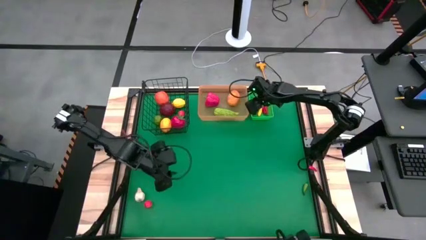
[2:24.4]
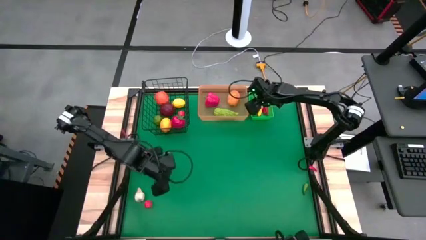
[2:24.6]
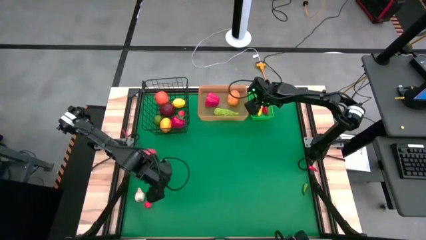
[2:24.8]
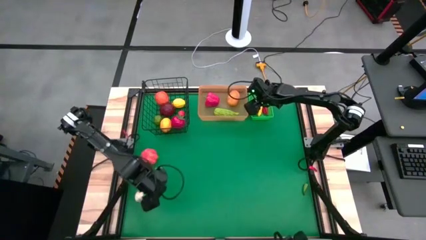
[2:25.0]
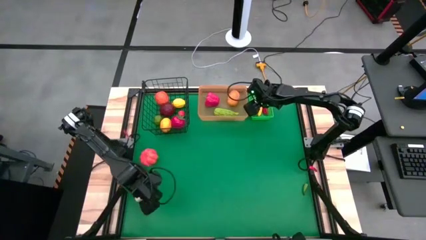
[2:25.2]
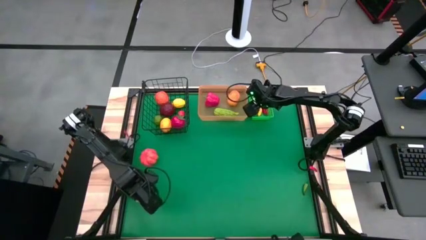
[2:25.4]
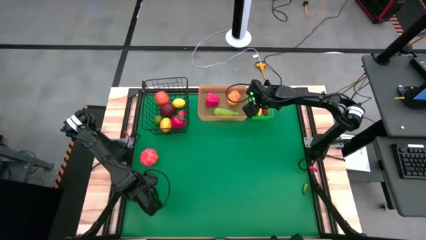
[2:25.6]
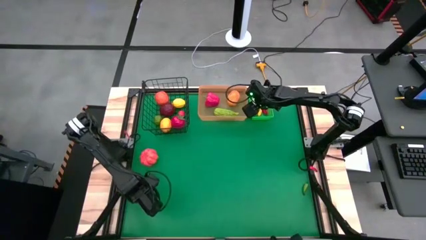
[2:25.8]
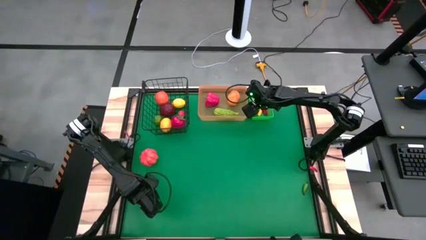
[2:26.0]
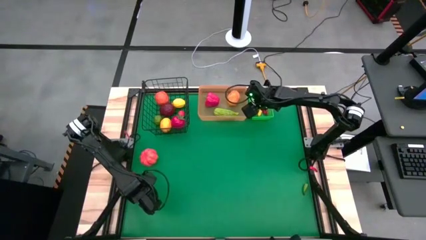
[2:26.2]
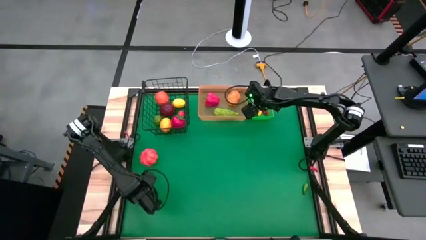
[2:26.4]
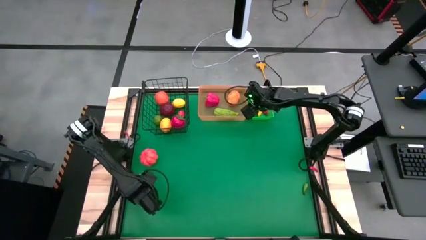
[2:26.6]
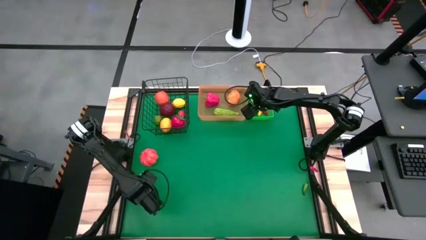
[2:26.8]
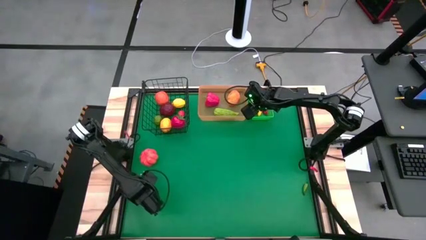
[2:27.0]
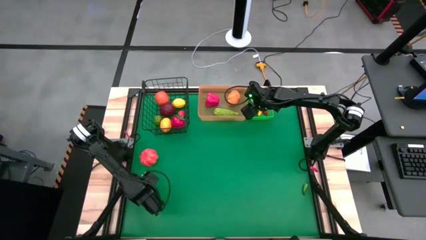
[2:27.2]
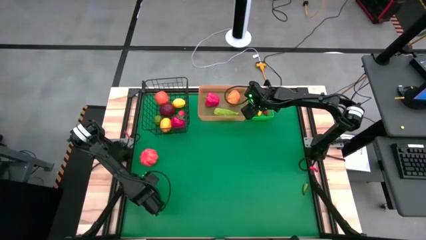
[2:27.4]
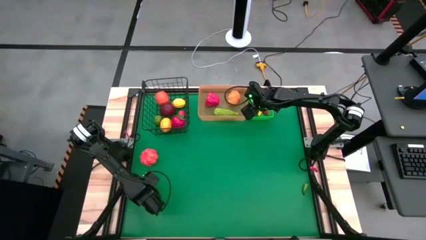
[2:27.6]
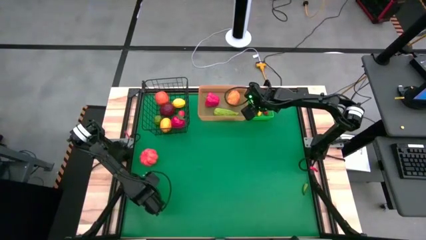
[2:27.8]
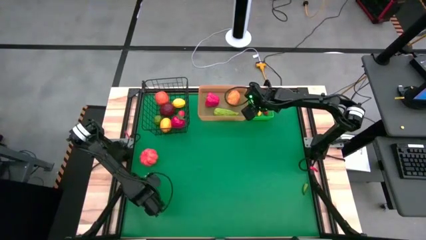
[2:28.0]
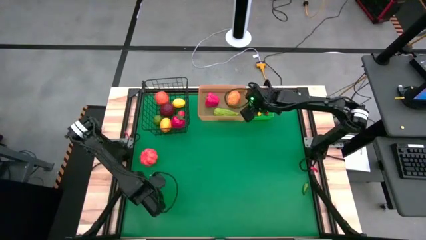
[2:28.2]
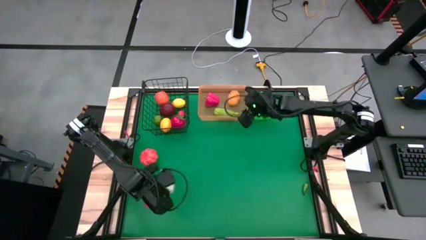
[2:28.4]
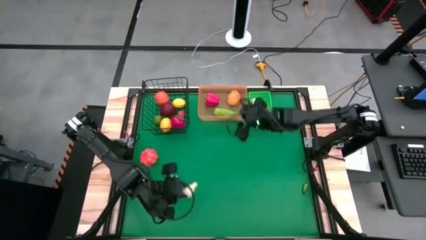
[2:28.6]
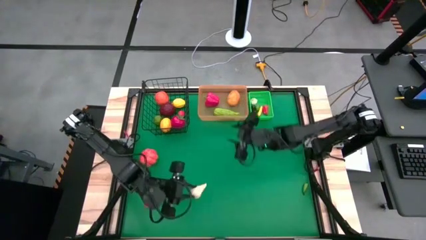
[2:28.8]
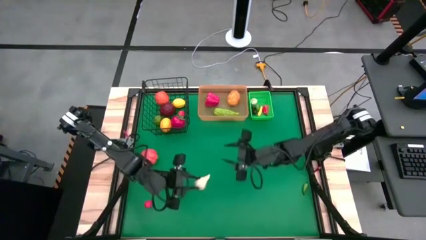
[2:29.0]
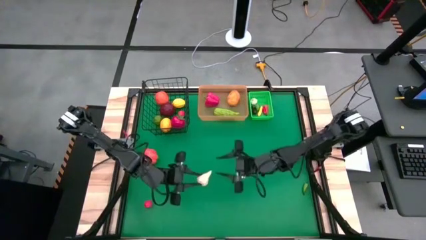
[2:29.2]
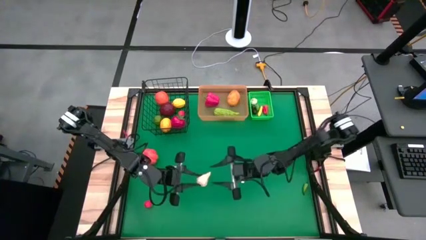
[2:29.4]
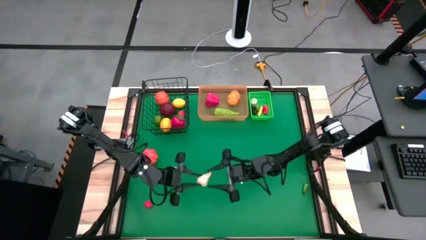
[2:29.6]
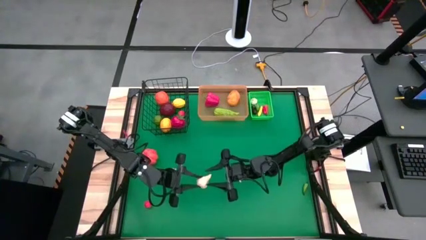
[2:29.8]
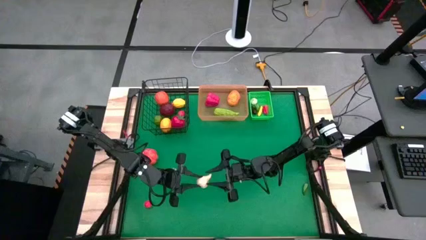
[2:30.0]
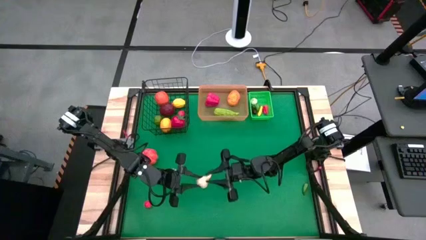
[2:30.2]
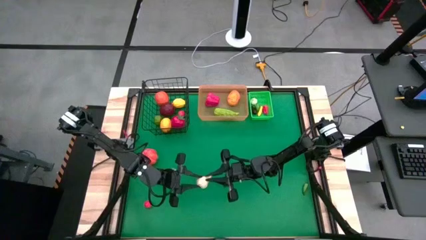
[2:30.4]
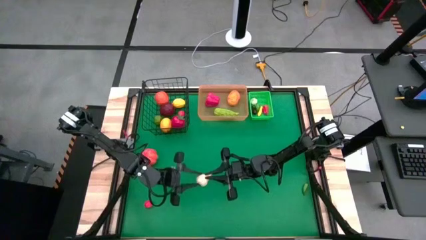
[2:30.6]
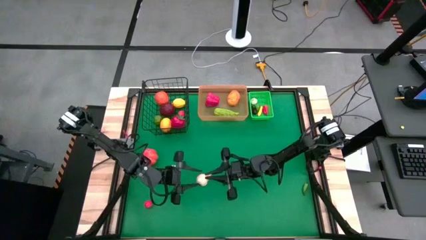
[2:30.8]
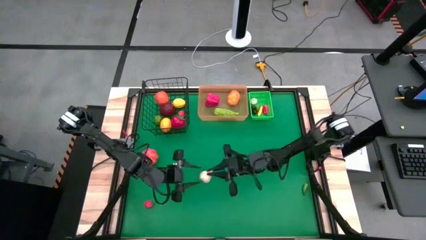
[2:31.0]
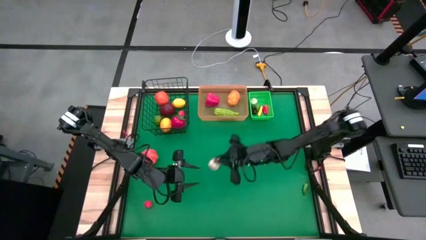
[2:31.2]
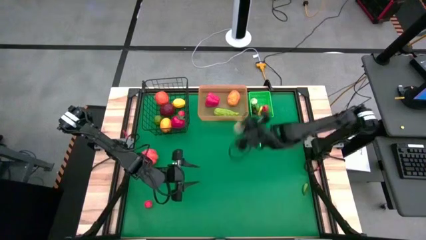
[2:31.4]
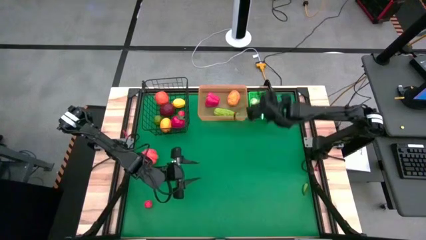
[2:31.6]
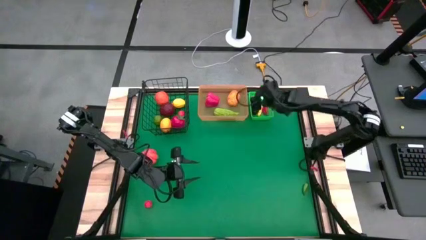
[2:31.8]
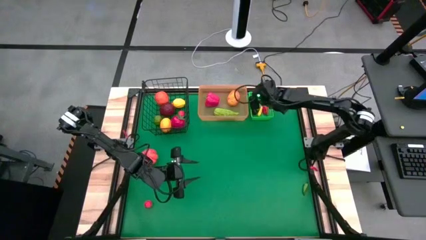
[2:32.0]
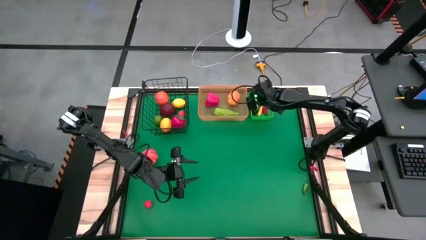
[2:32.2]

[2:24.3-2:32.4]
Task: Sort produce into baskets
Put the white garlic into the green basket

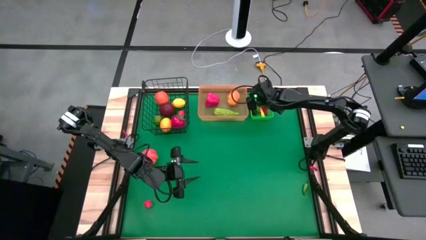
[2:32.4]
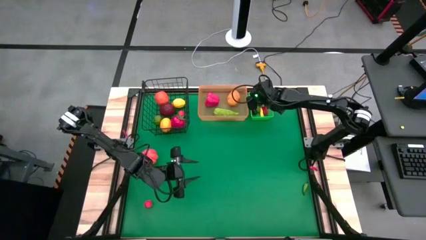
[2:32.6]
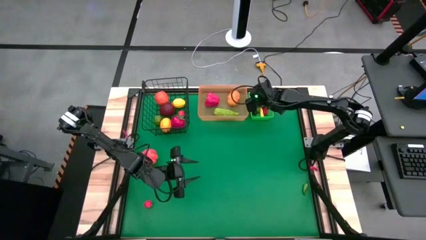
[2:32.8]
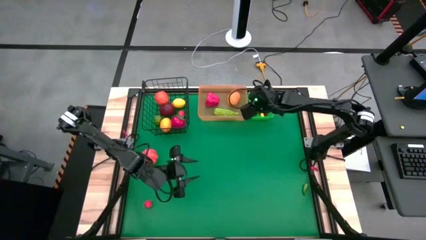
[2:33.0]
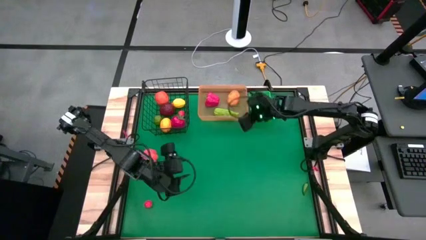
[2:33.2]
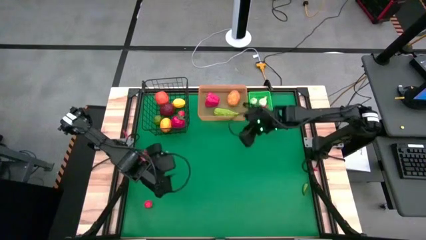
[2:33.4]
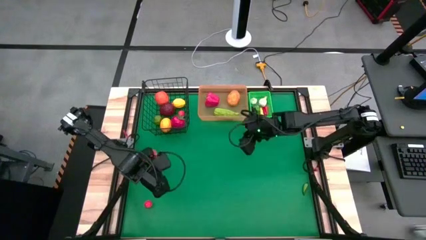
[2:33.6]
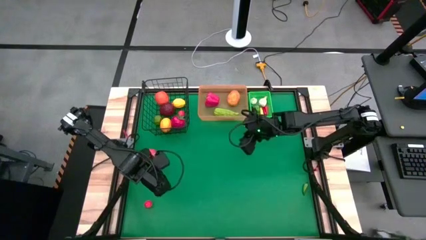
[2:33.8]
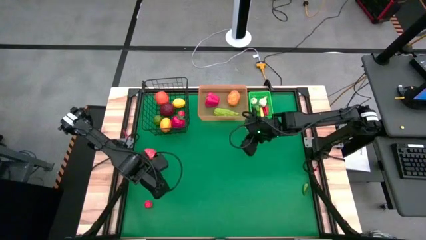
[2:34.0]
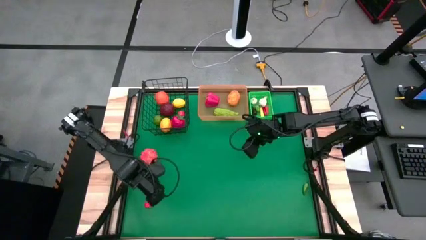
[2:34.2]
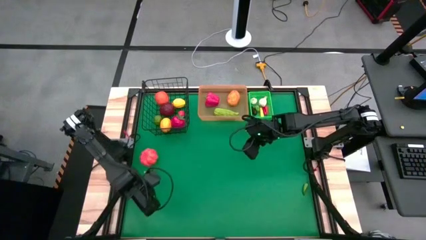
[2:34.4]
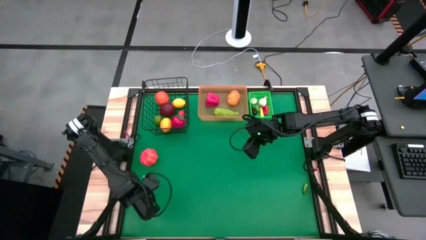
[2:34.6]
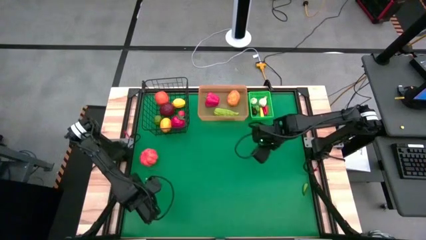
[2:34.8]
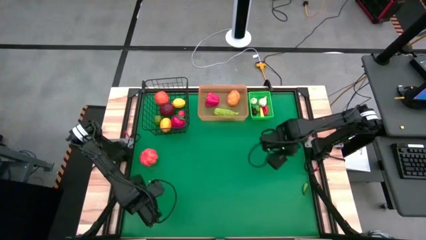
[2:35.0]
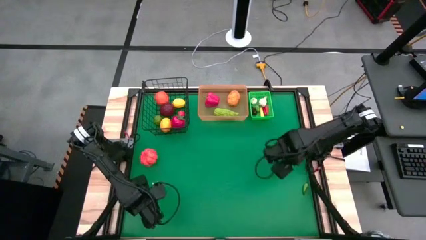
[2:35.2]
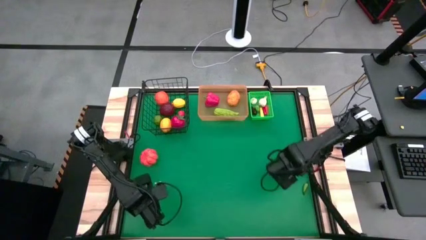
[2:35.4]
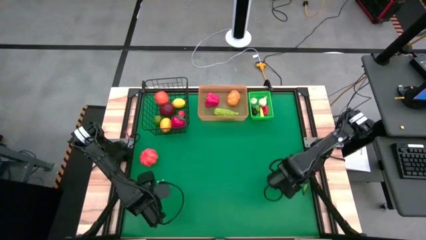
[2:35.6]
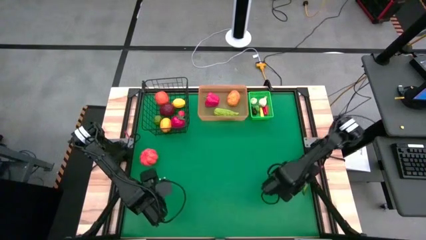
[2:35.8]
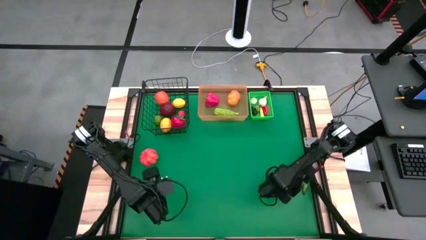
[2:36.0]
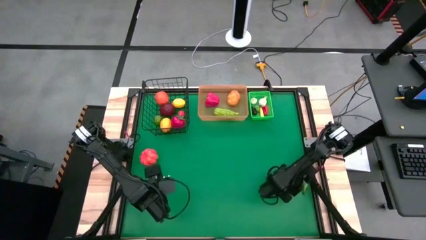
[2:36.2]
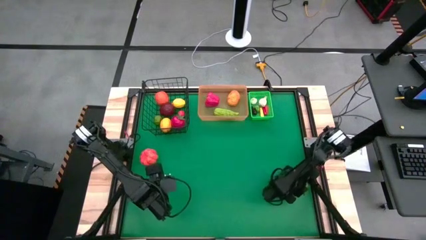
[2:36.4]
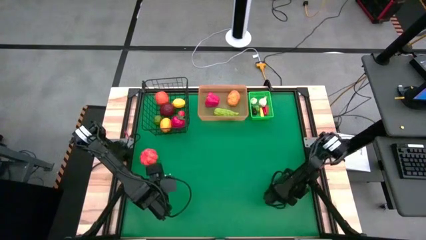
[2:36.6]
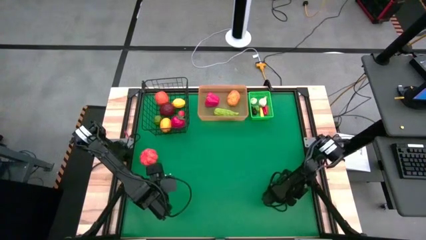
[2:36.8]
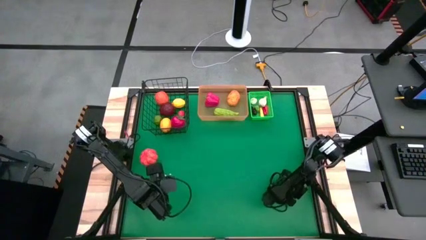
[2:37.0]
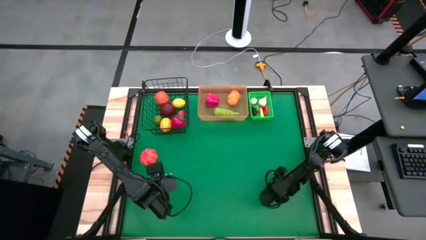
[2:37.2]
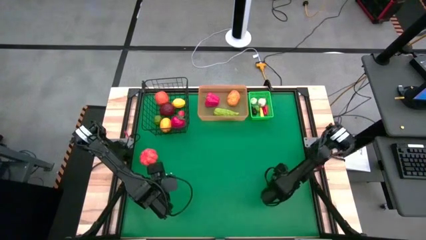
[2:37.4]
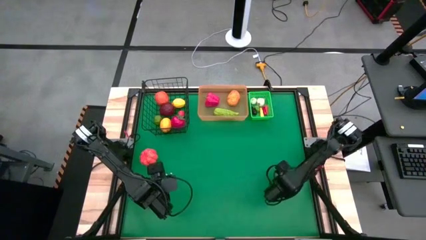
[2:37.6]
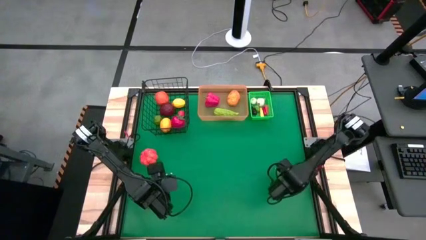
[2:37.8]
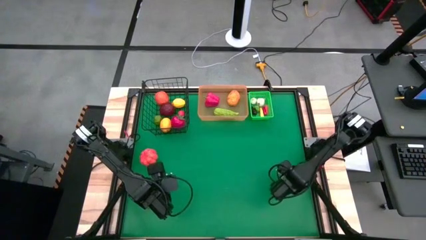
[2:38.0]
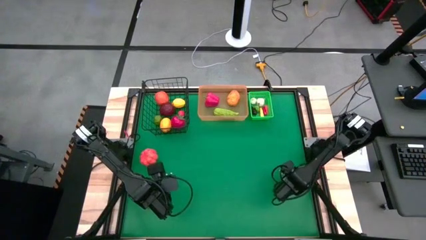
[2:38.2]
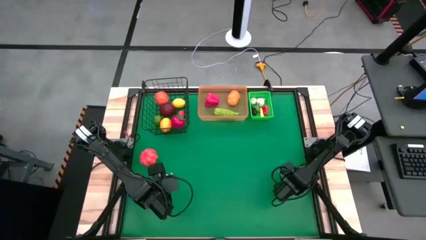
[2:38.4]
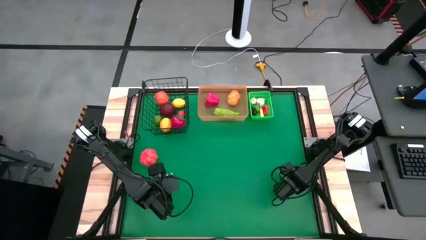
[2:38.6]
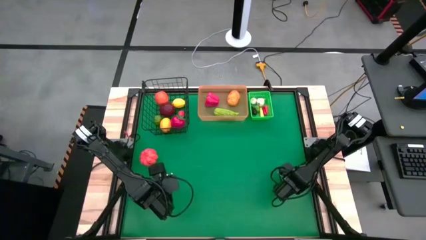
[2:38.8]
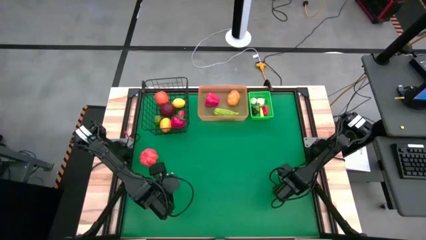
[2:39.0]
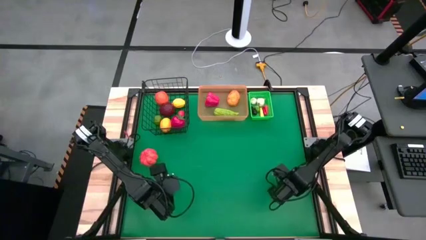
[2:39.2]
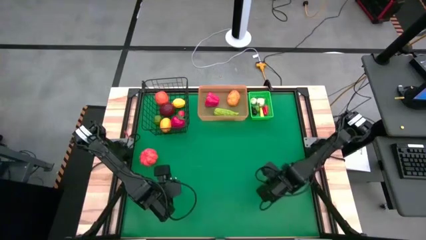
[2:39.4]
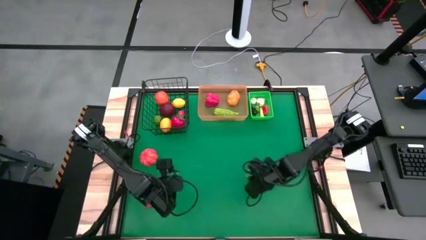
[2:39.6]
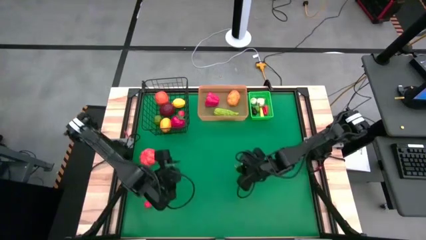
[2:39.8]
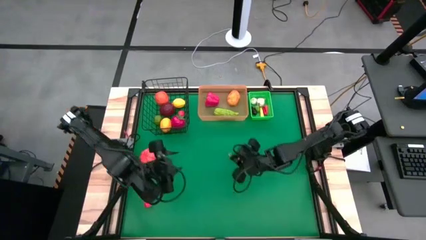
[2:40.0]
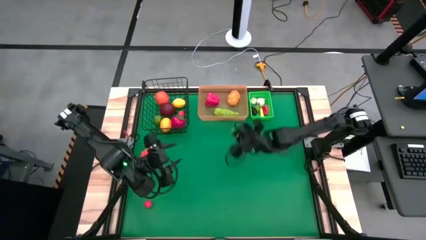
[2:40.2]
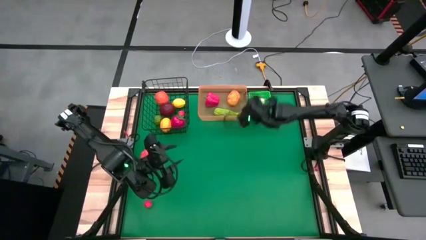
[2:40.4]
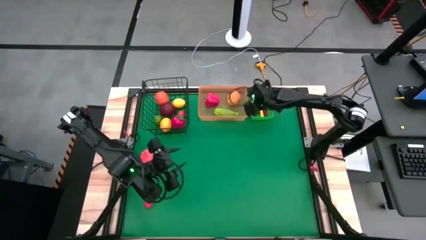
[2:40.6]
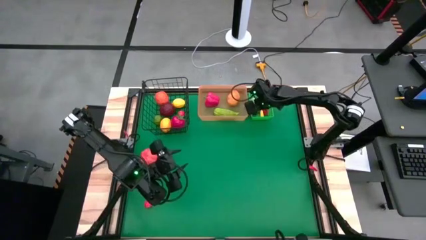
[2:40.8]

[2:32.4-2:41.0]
Put the green chilli pepper into the green bin
